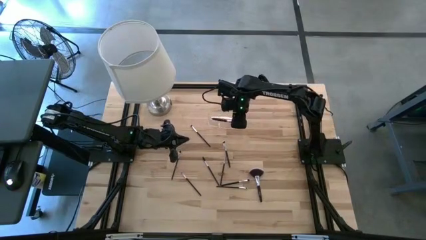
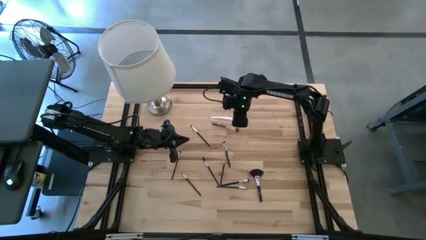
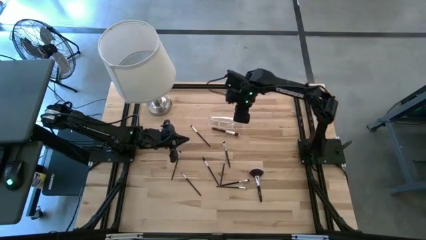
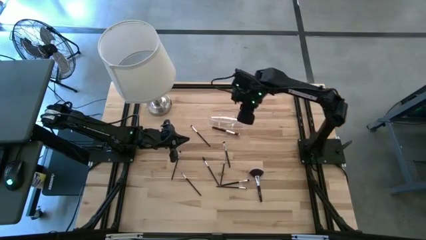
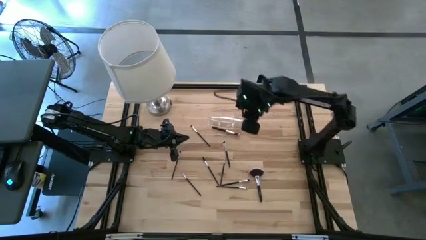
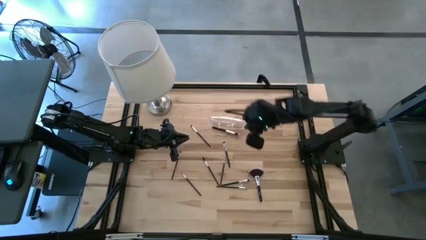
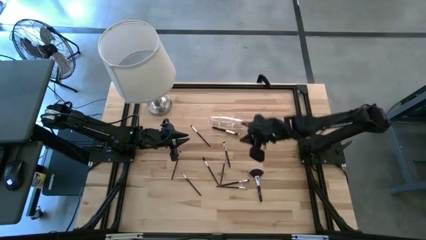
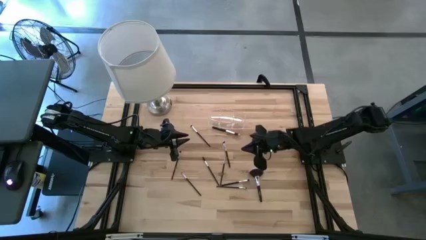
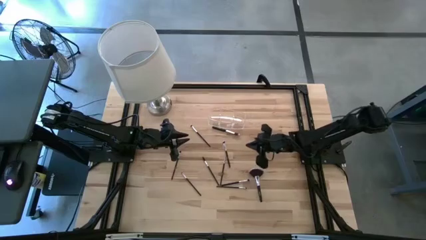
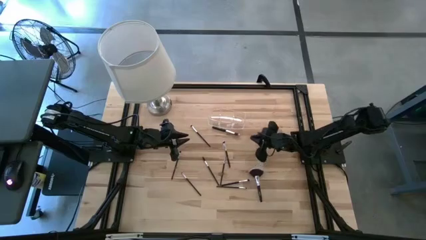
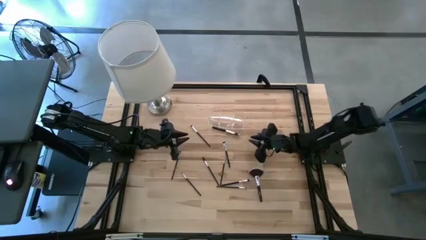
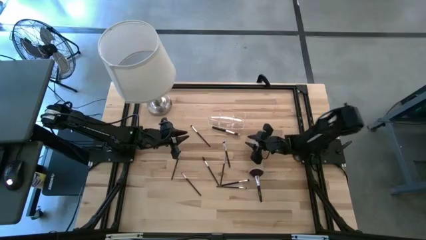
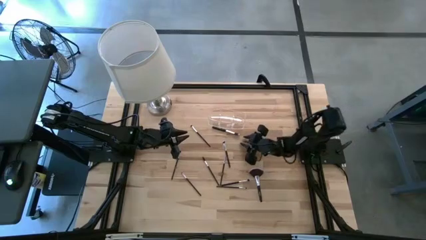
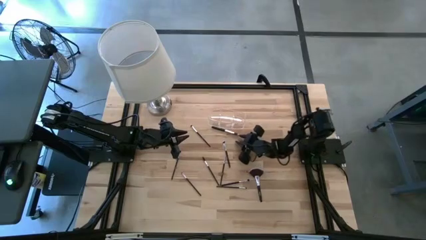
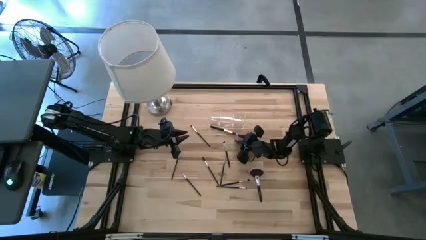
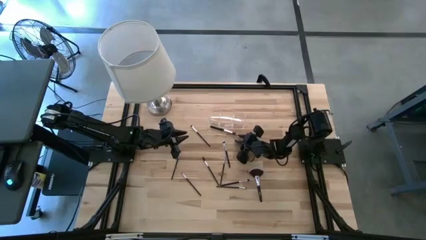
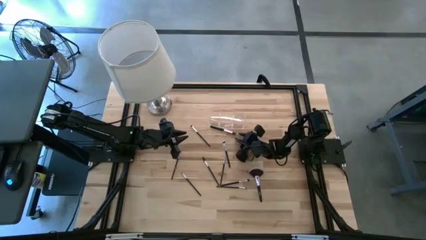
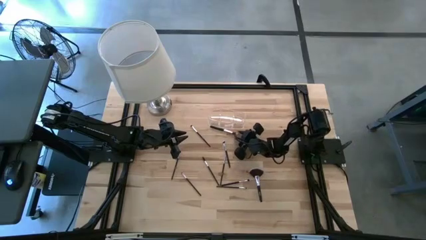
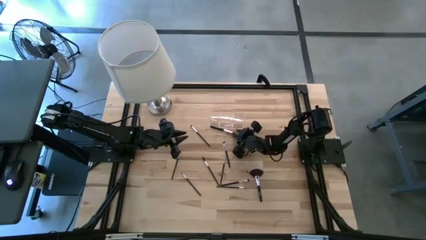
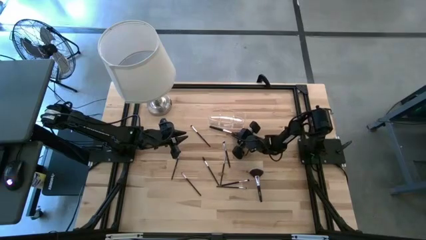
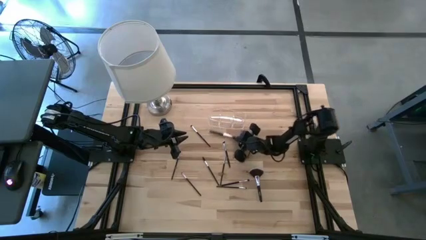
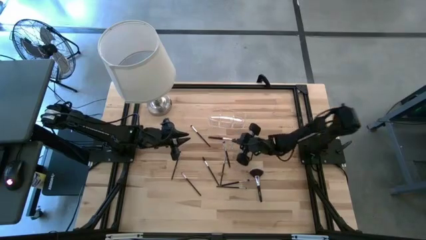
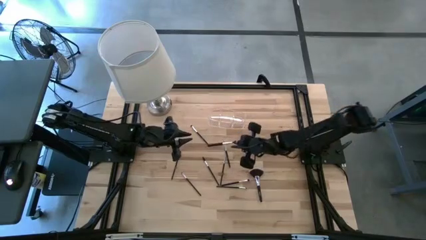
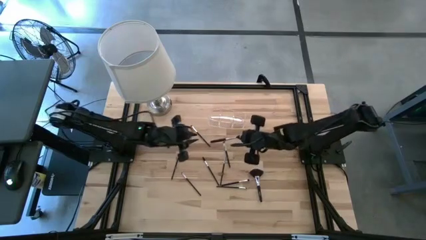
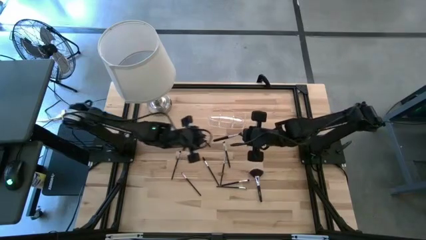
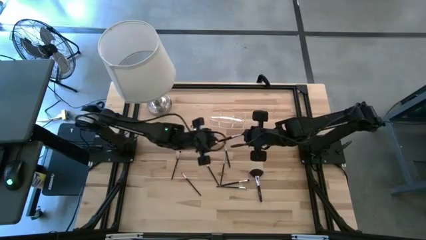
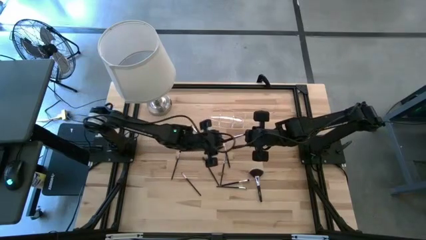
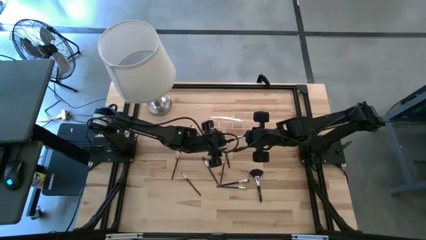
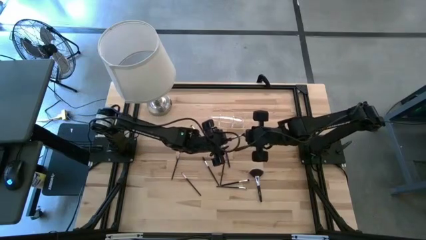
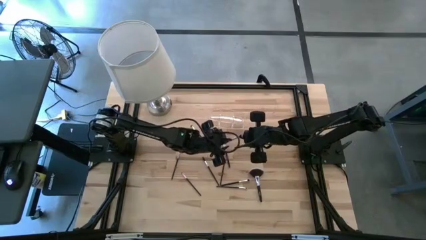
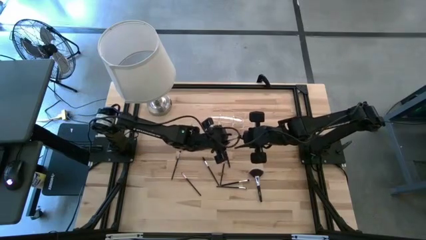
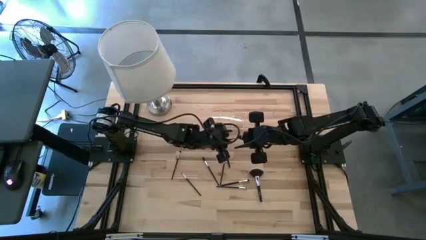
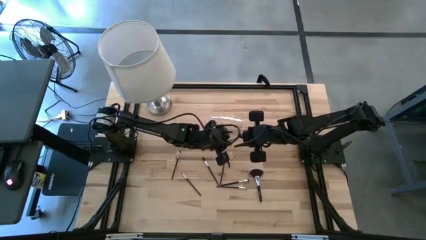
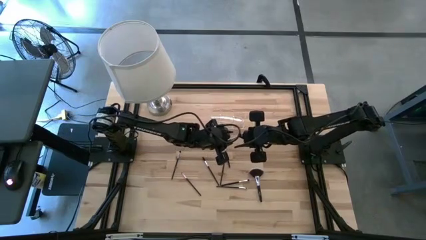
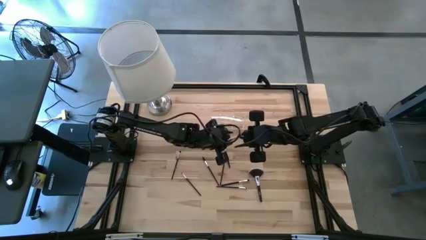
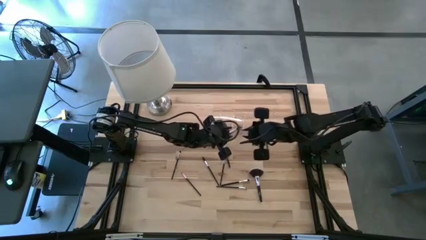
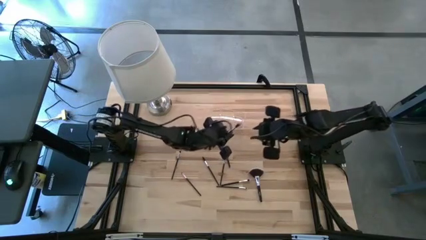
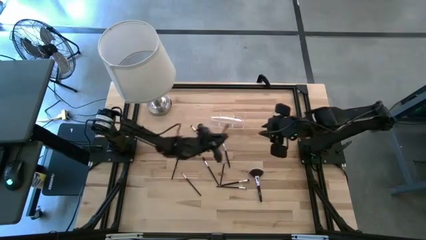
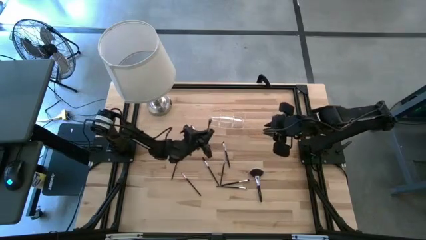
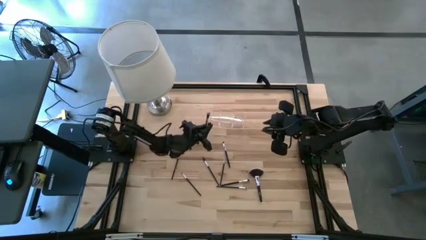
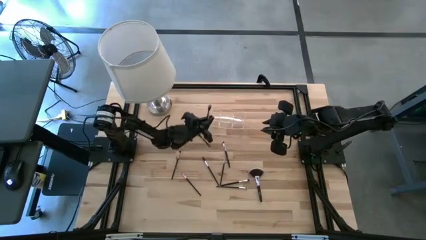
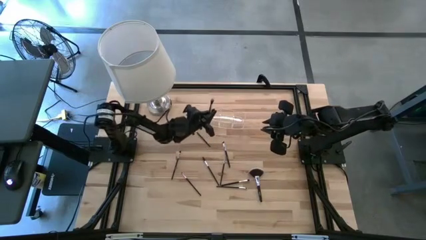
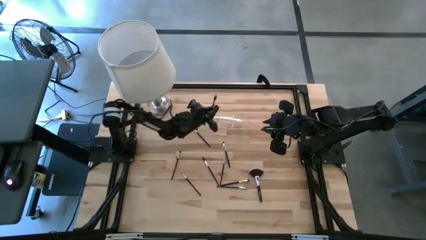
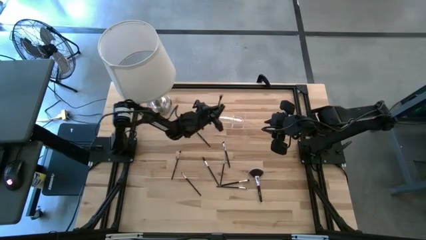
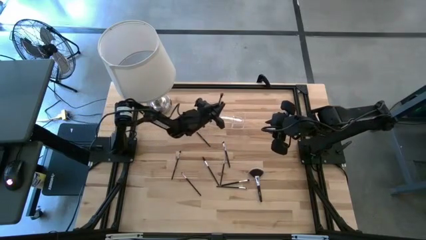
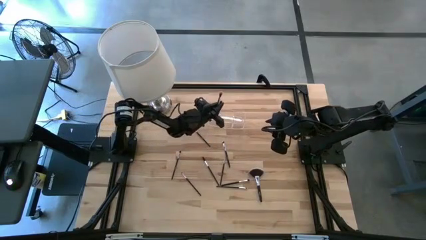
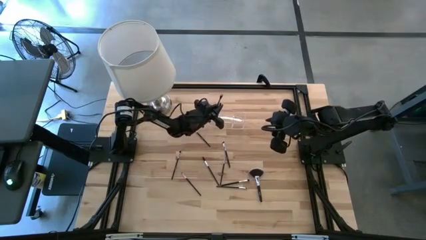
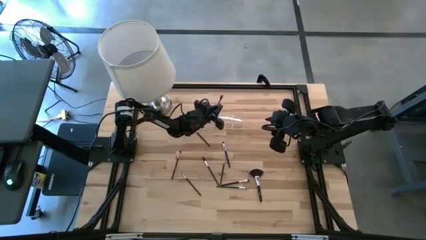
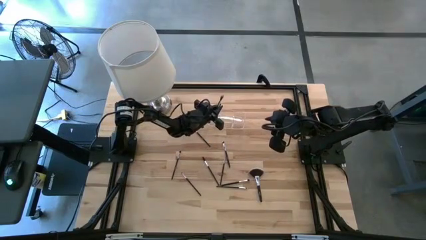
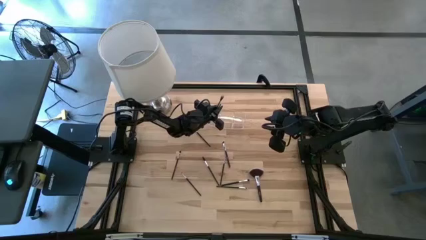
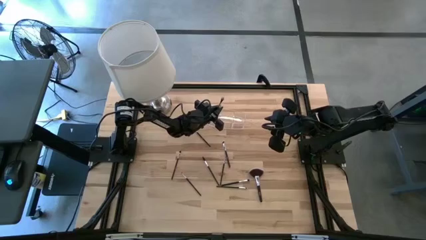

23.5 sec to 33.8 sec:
Task: Put items in baskets/containers
Put the foundation brush into the transparent organizer

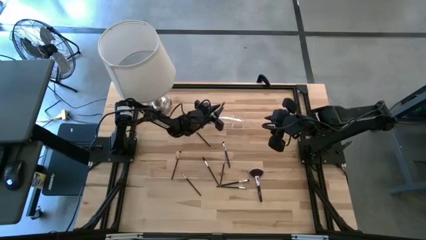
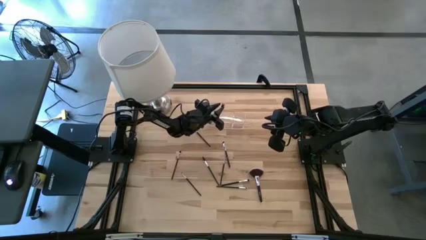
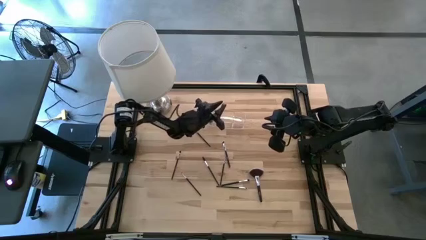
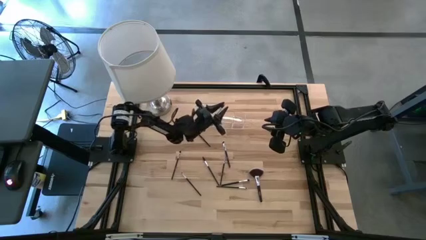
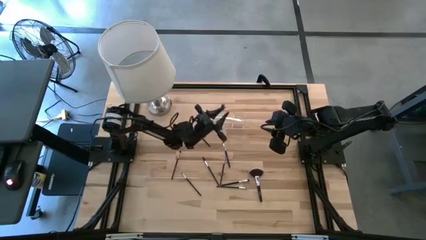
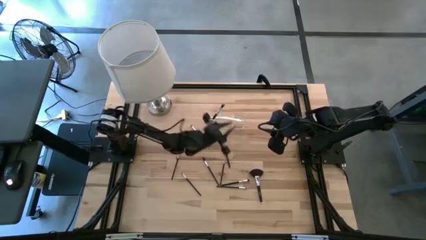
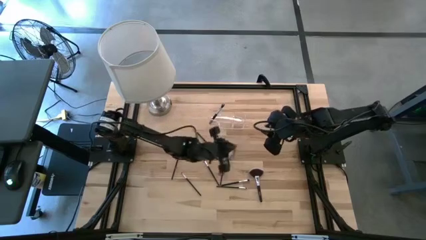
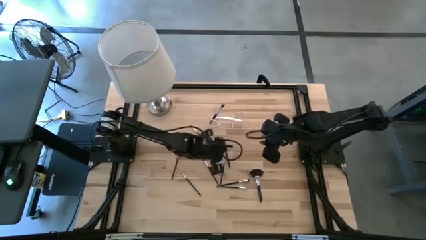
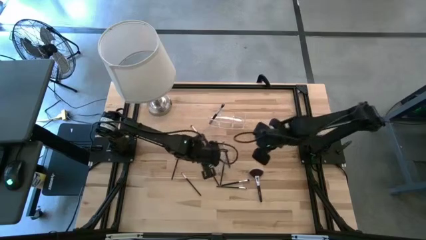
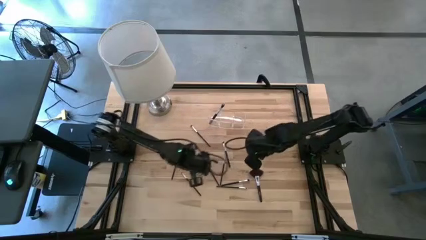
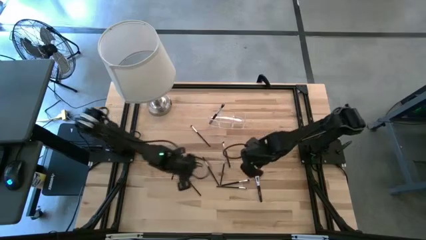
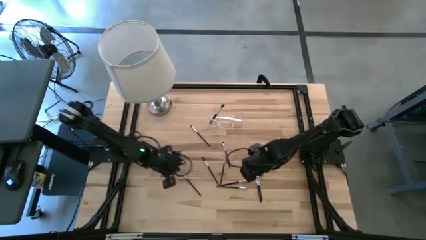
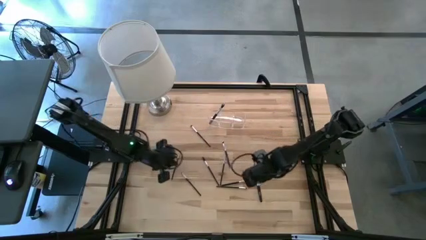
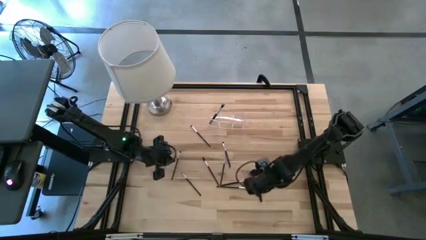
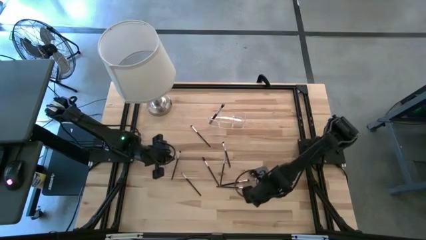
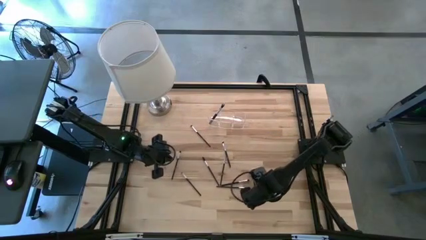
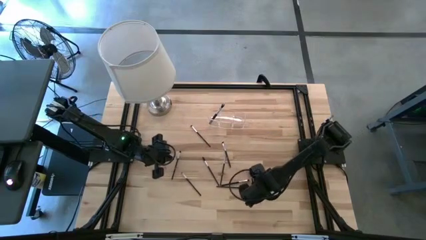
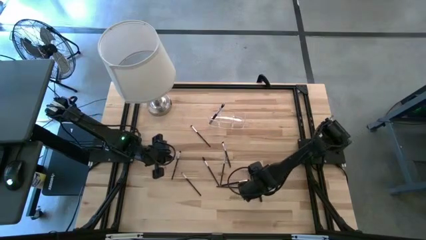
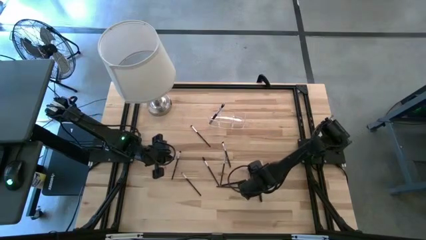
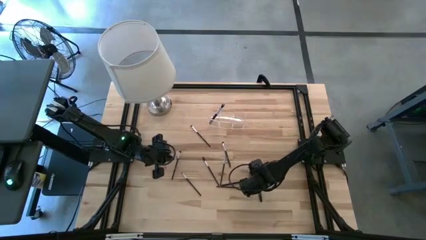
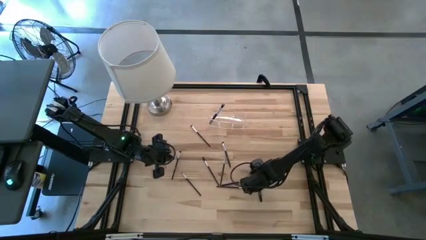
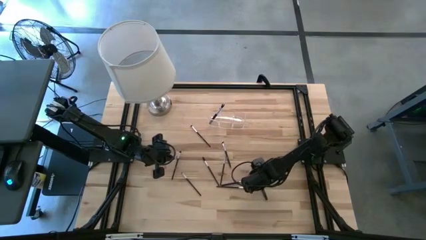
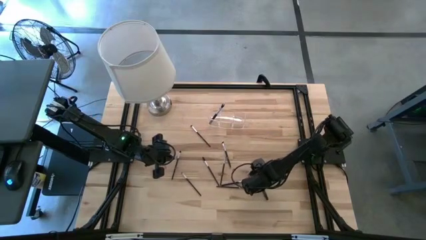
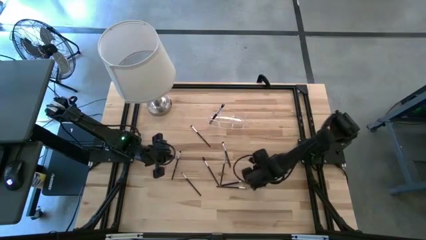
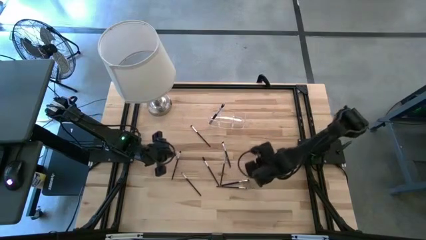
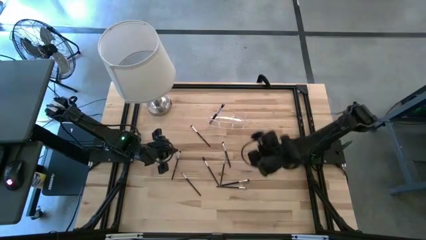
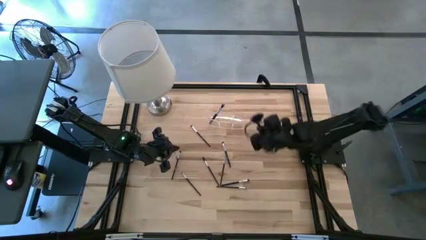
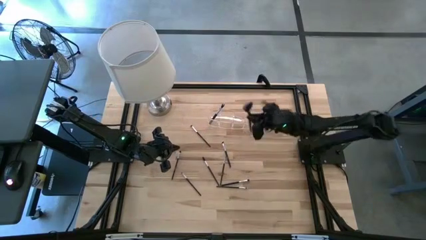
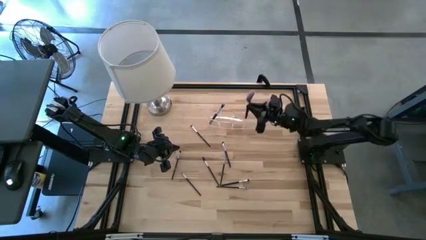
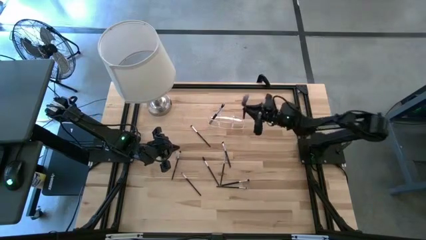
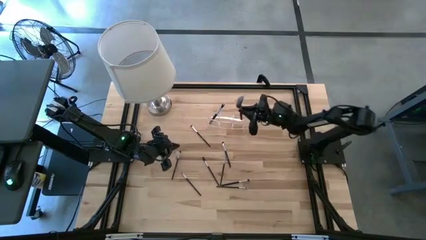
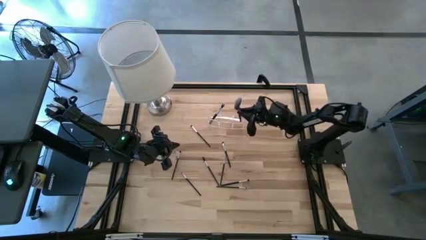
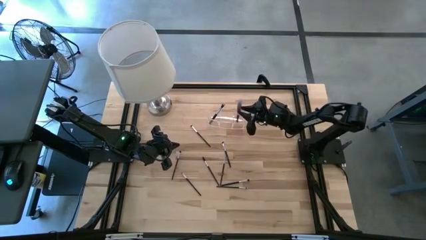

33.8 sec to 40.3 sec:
Put the highlighter brush into the transparent organizer
